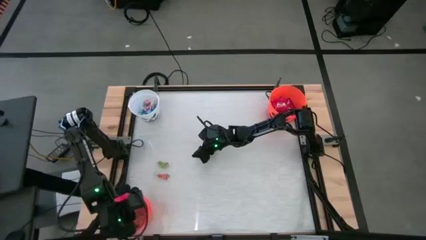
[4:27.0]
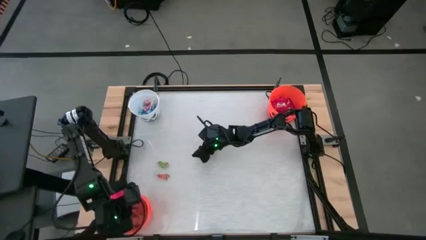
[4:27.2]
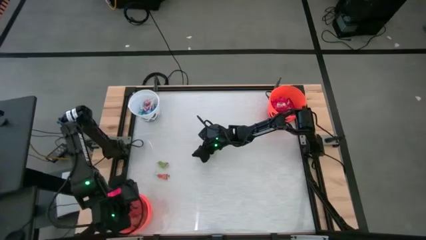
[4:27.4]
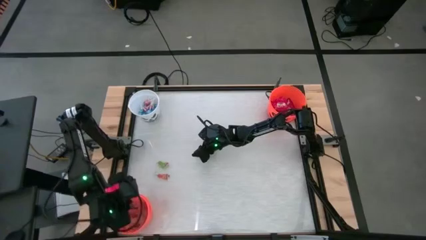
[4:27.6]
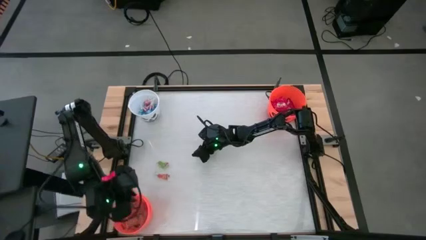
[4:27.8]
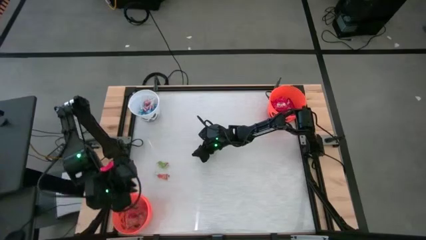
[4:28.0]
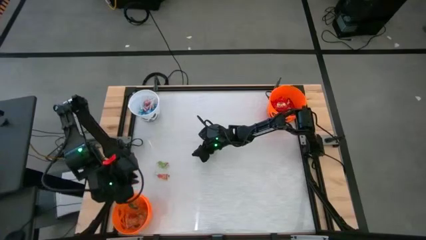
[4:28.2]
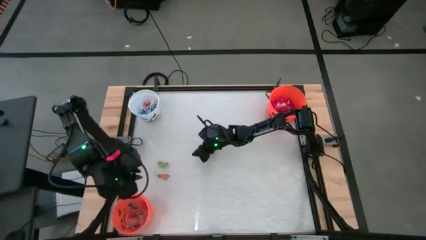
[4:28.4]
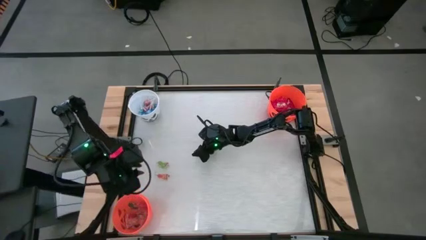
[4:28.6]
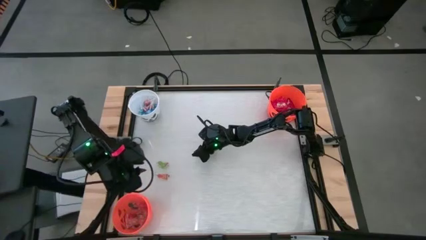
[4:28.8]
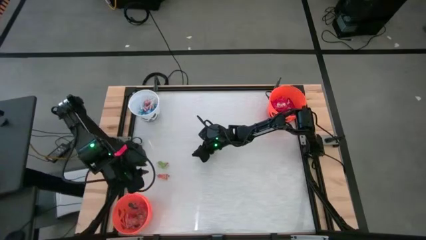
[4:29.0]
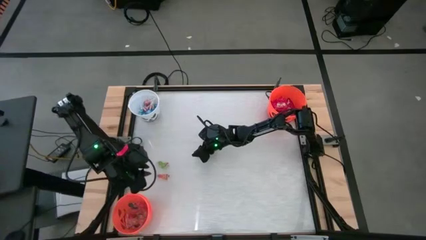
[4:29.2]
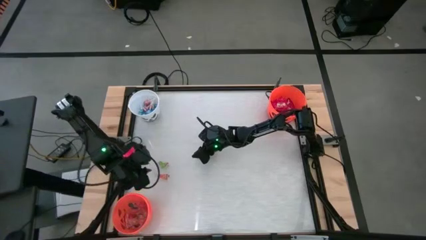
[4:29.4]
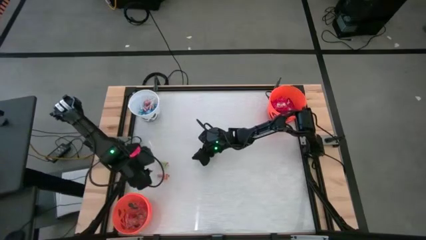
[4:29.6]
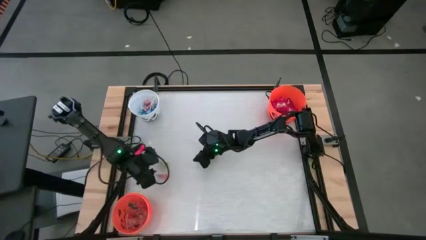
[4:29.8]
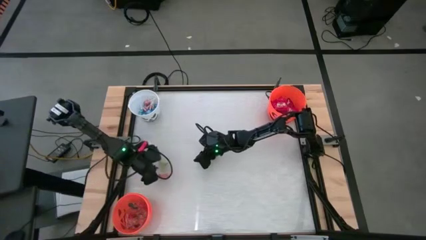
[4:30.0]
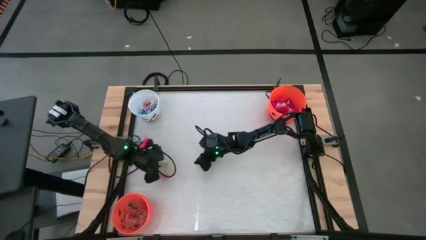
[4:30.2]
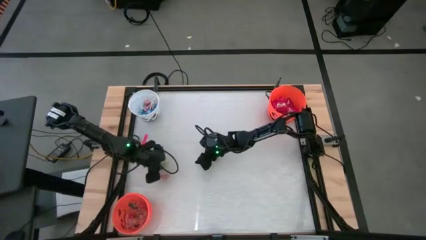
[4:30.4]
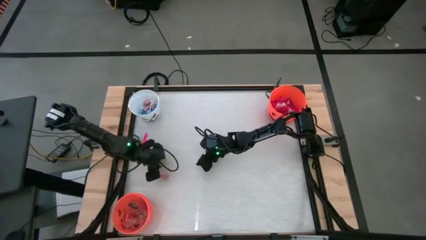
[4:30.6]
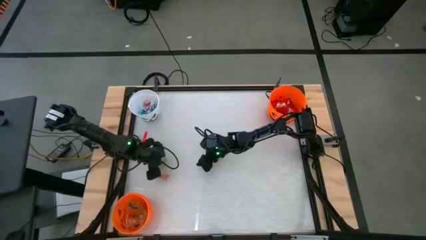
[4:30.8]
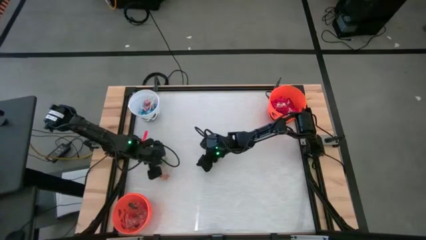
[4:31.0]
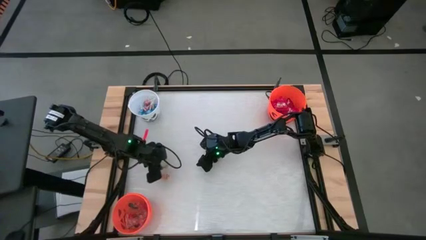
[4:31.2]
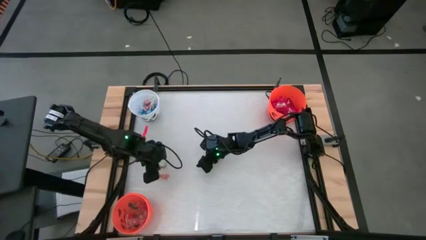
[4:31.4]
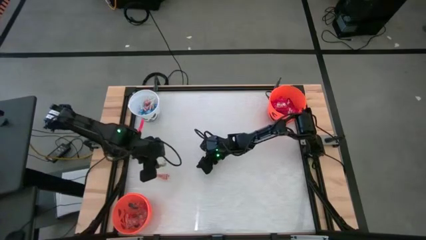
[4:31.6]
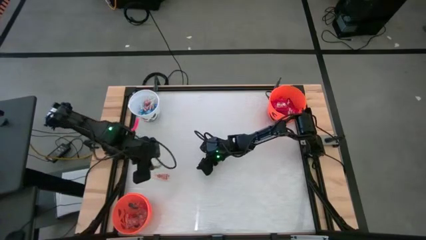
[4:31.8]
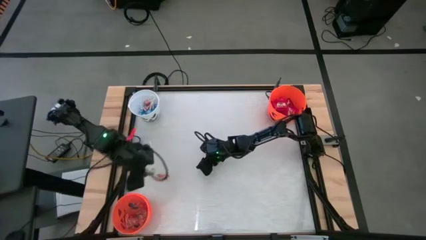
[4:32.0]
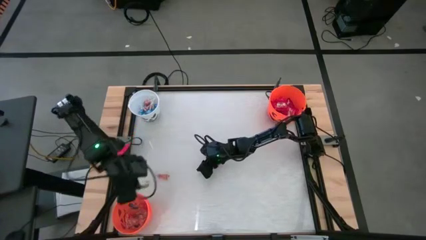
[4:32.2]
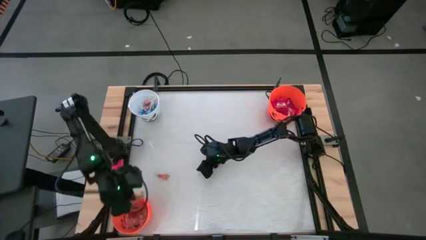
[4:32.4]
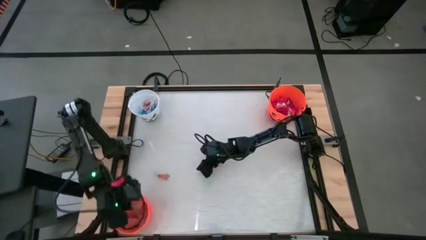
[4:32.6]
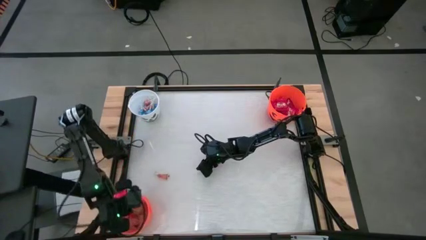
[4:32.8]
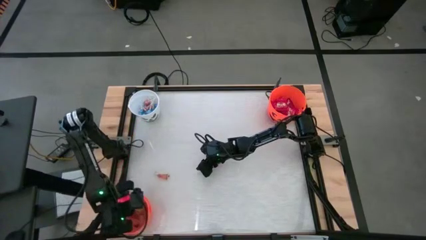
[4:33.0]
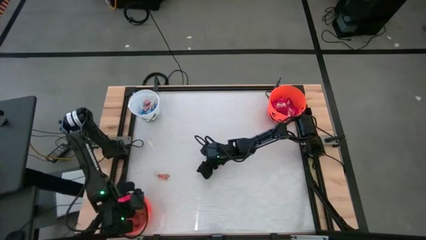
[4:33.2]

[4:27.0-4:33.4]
Task: Sort candy by brand, put in halloween buckets
Put the green gummy into the bottom orange bucket

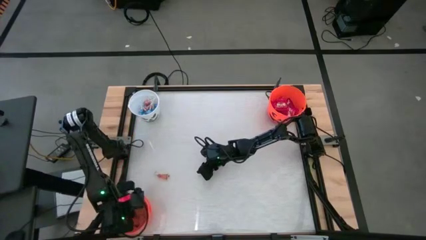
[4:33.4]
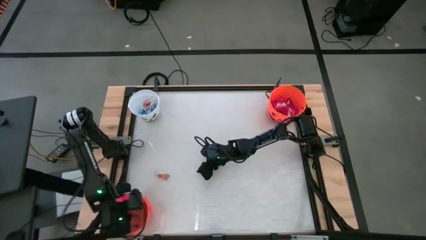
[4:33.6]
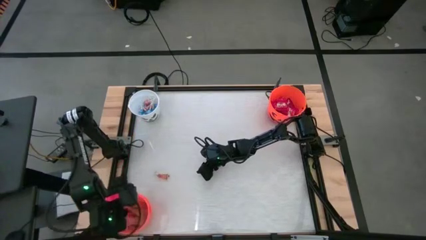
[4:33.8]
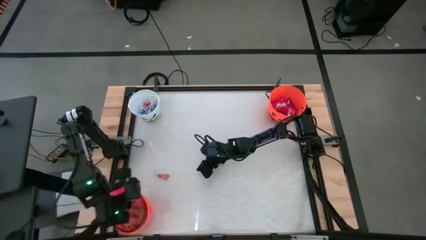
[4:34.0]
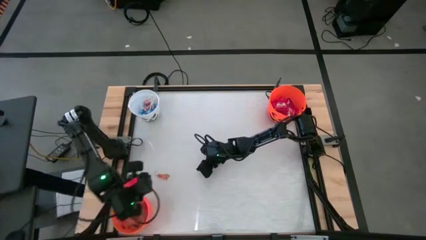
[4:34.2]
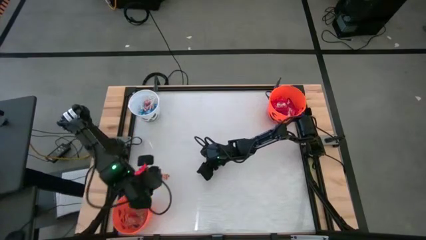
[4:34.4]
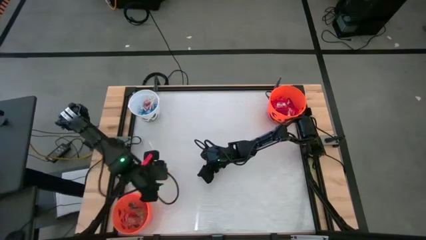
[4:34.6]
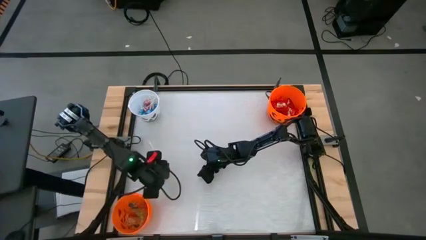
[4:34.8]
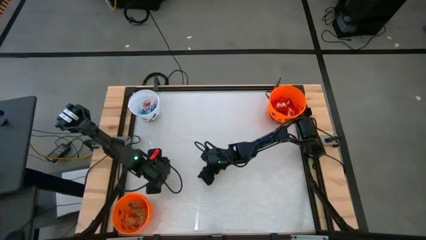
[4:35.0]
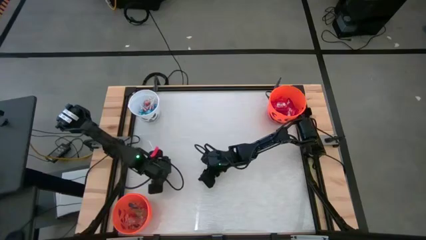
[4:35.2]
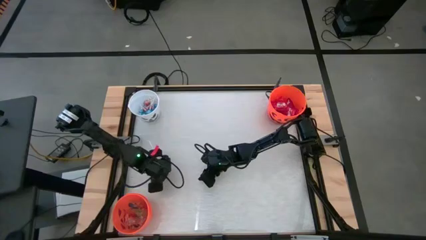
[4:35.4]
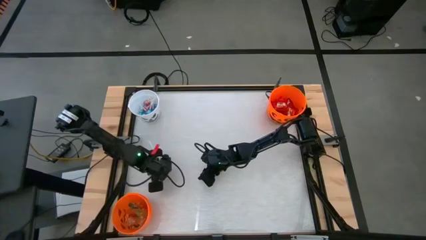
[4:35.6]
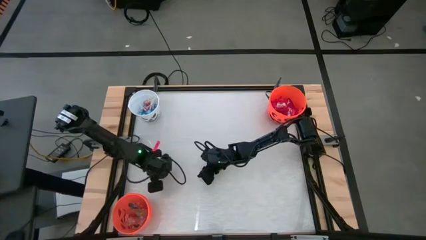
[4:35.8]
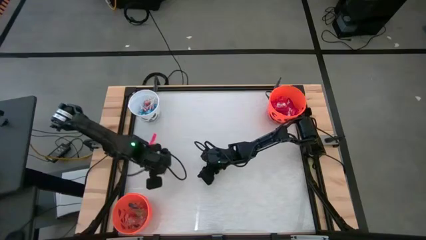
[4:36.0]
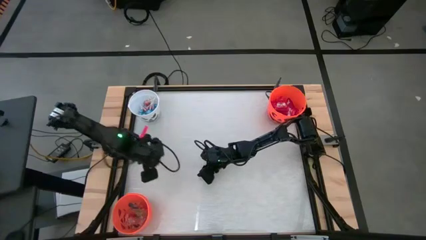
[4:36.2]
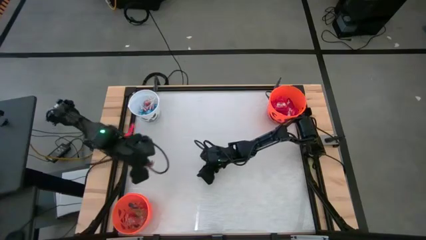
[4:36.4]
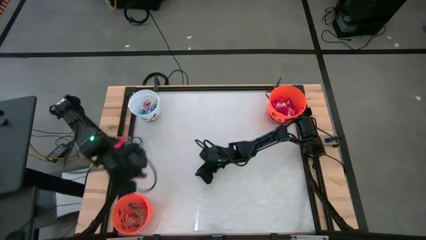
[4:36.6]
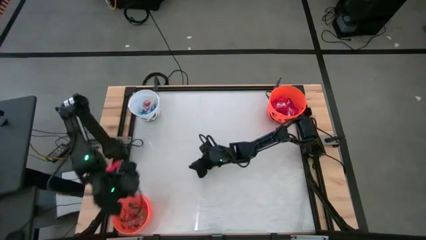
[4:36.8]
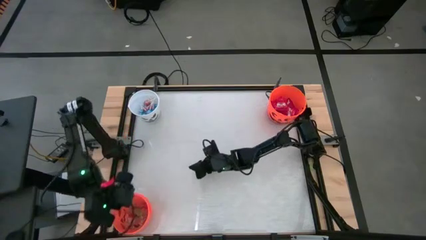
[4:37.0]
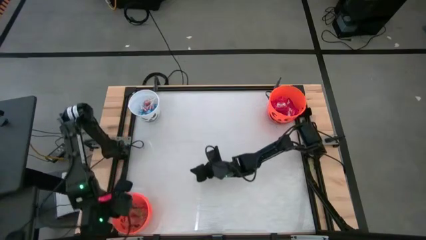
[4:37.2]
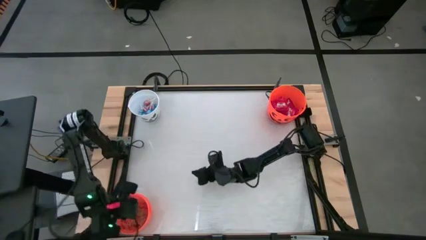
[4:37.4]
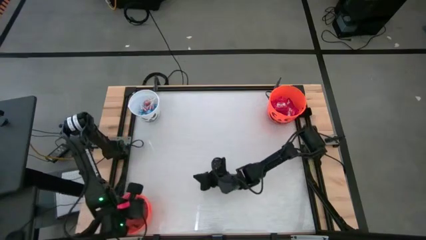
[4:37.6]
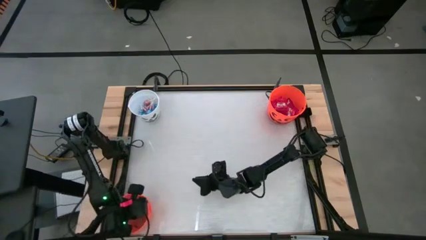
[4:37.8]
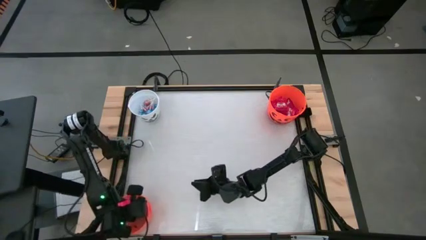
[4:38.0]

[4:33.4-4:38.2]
Put the orange gummy into the bottom orange bucket
